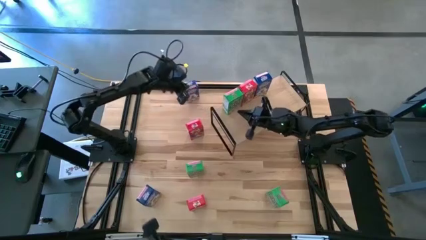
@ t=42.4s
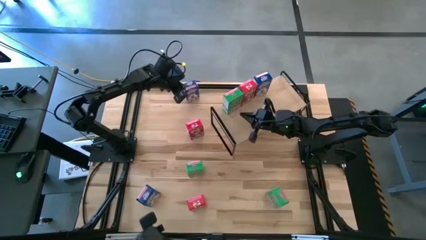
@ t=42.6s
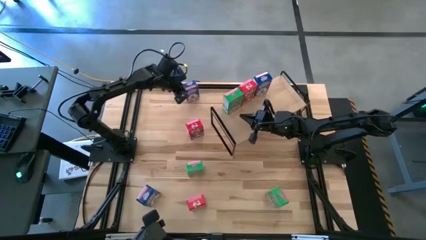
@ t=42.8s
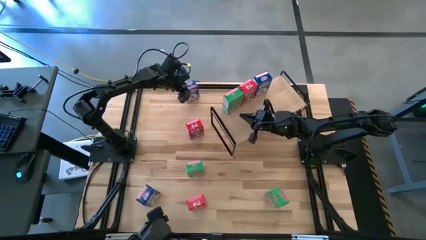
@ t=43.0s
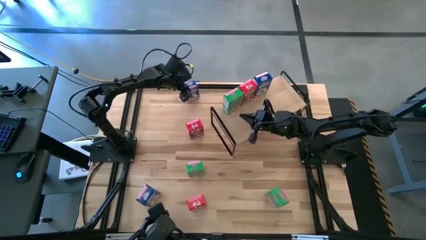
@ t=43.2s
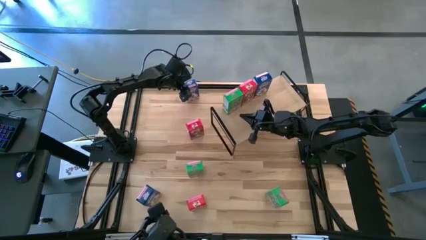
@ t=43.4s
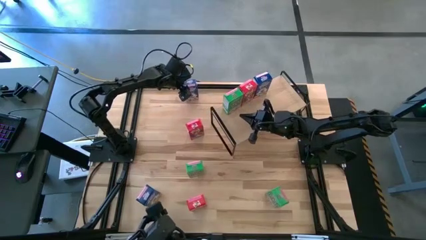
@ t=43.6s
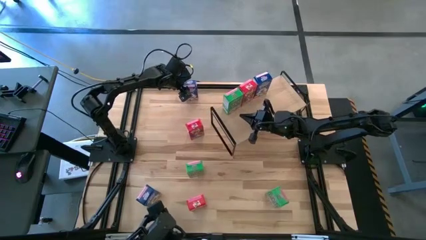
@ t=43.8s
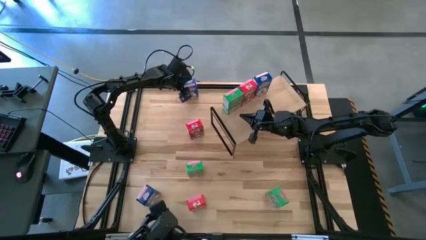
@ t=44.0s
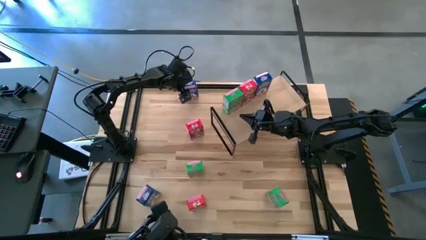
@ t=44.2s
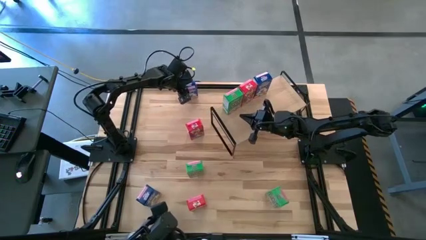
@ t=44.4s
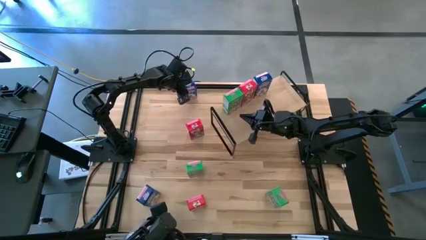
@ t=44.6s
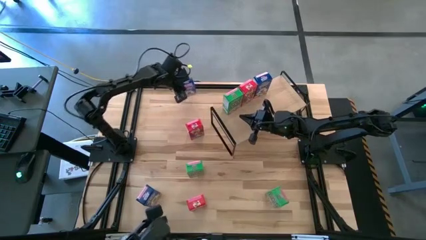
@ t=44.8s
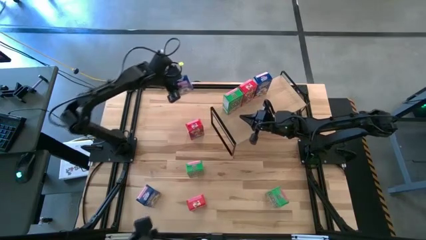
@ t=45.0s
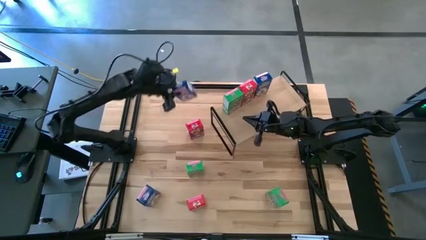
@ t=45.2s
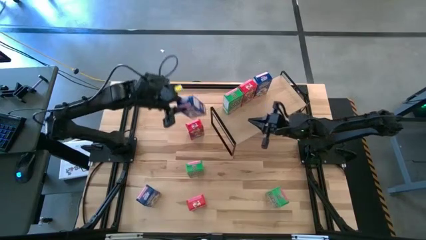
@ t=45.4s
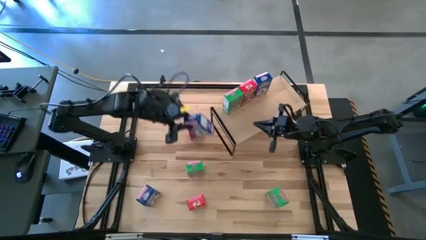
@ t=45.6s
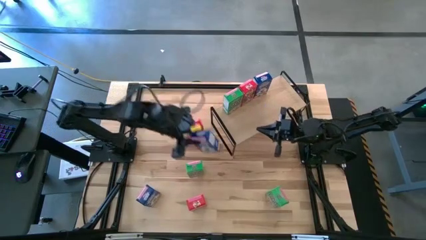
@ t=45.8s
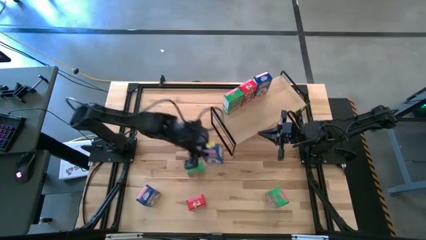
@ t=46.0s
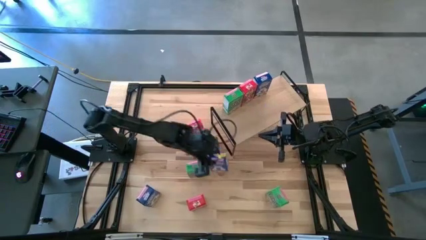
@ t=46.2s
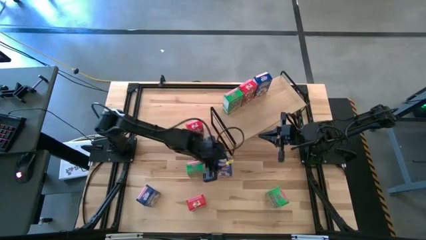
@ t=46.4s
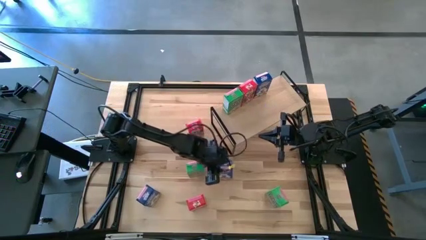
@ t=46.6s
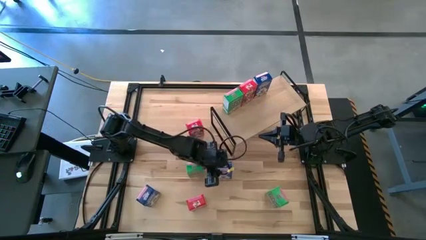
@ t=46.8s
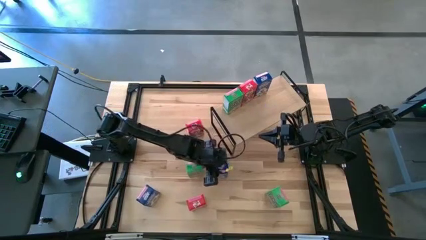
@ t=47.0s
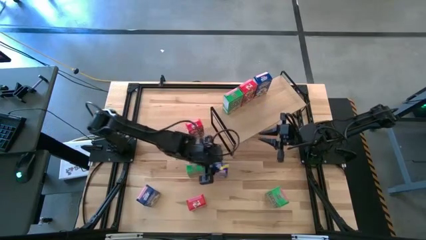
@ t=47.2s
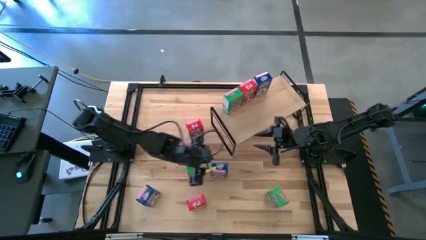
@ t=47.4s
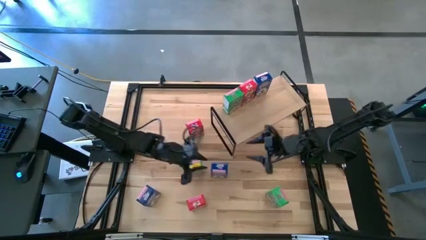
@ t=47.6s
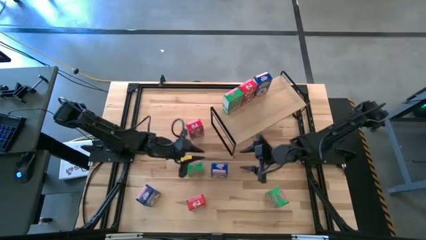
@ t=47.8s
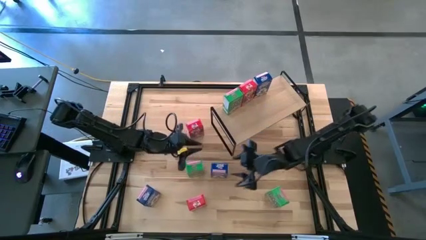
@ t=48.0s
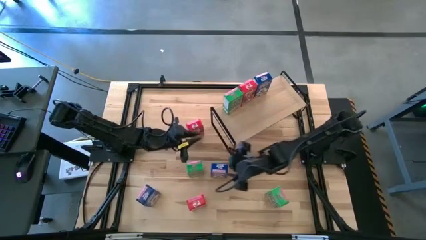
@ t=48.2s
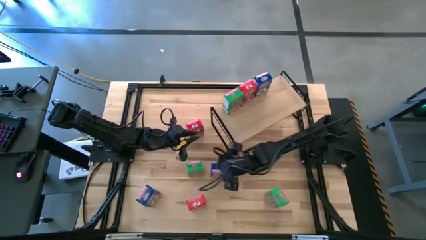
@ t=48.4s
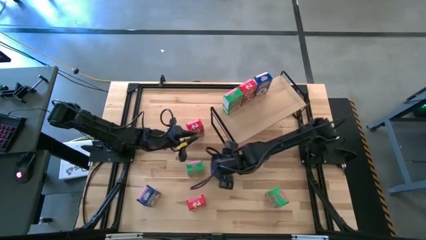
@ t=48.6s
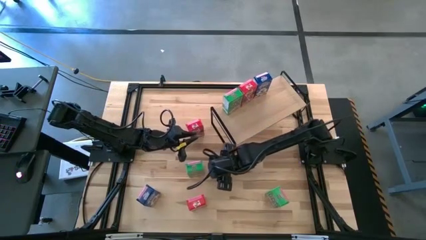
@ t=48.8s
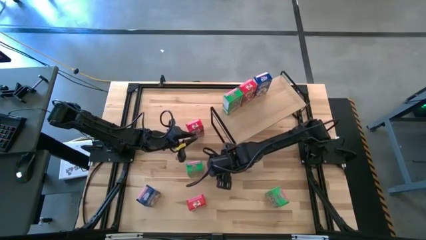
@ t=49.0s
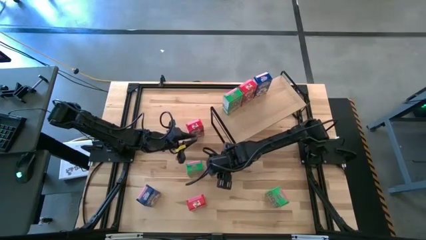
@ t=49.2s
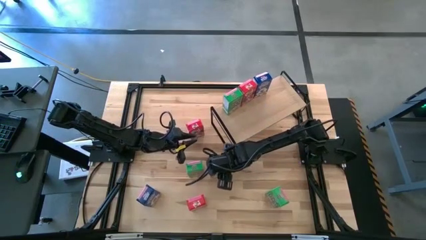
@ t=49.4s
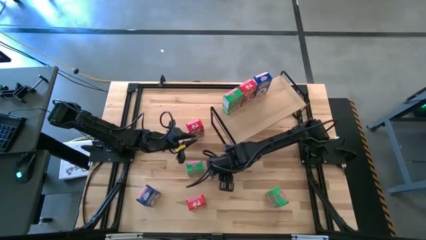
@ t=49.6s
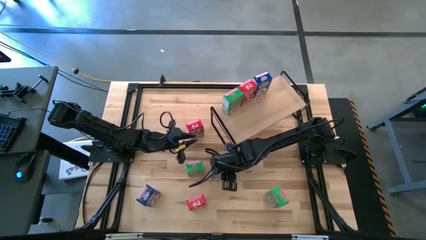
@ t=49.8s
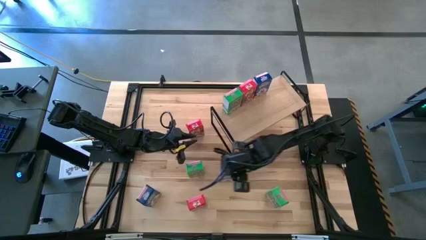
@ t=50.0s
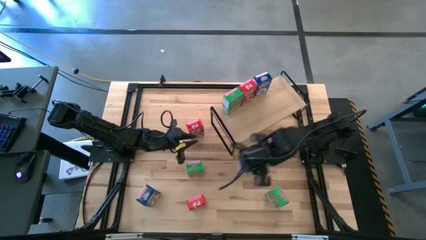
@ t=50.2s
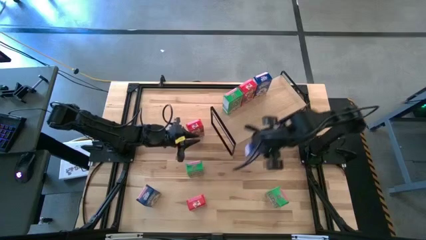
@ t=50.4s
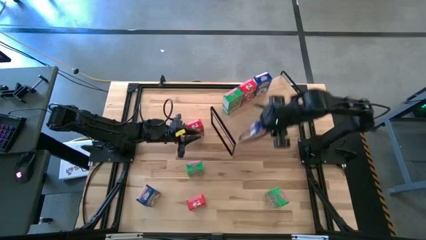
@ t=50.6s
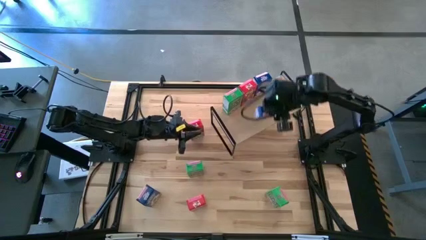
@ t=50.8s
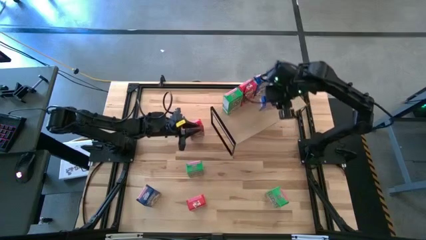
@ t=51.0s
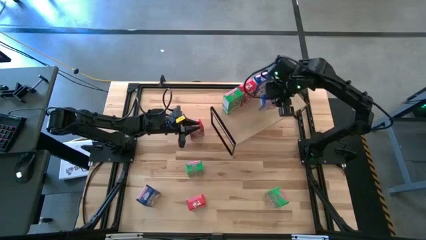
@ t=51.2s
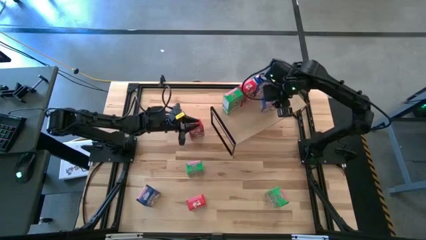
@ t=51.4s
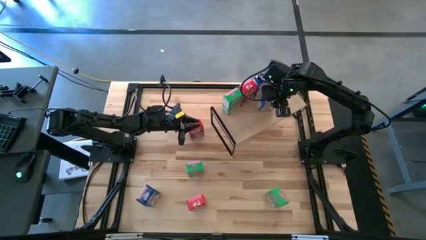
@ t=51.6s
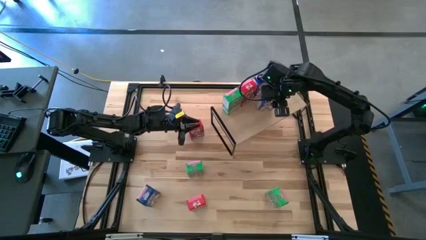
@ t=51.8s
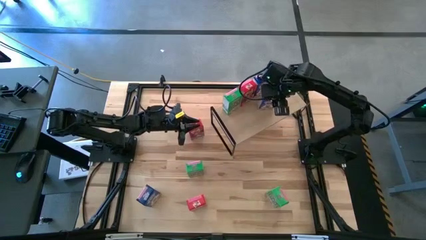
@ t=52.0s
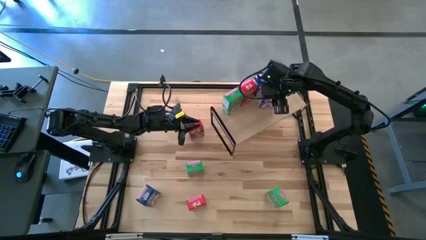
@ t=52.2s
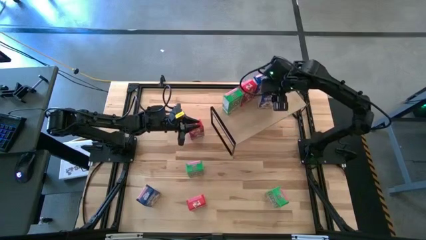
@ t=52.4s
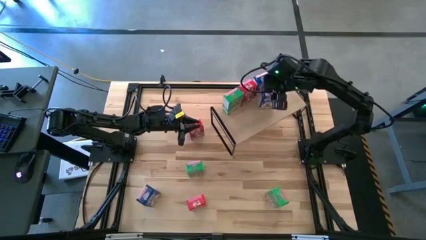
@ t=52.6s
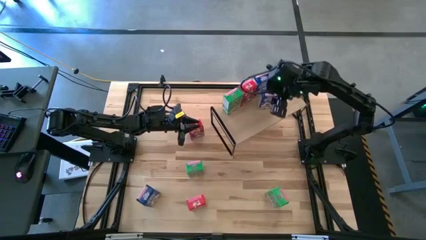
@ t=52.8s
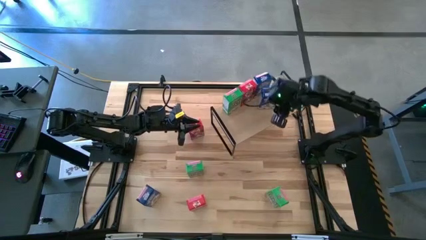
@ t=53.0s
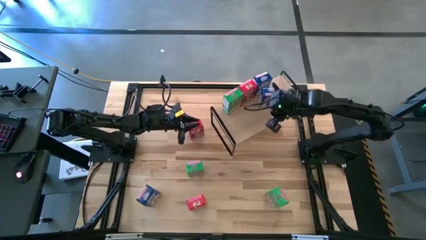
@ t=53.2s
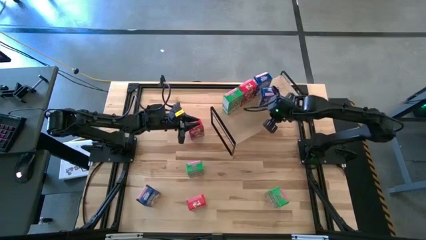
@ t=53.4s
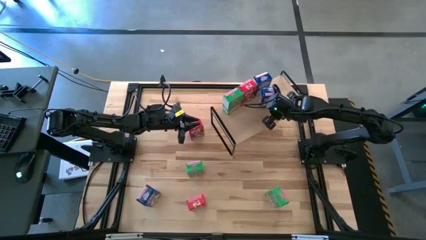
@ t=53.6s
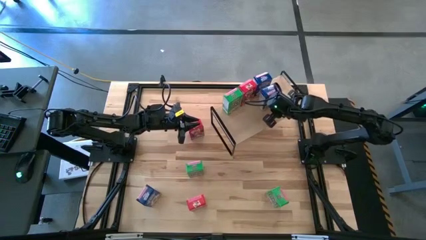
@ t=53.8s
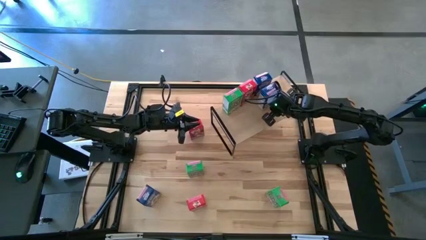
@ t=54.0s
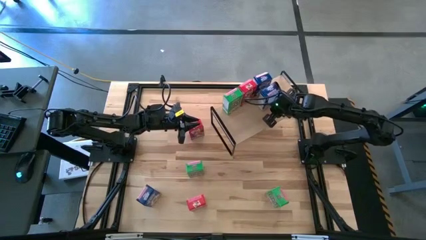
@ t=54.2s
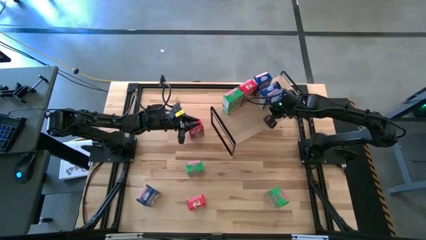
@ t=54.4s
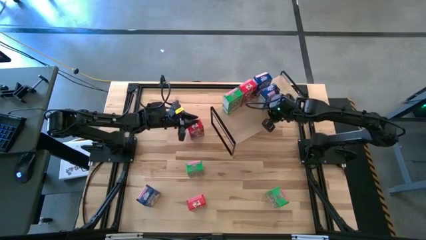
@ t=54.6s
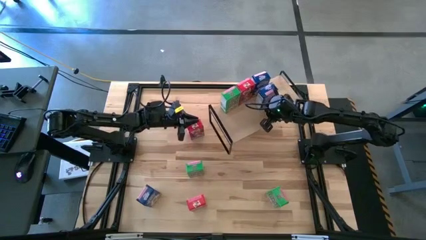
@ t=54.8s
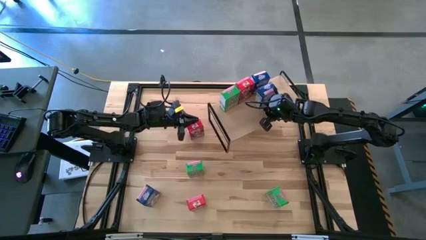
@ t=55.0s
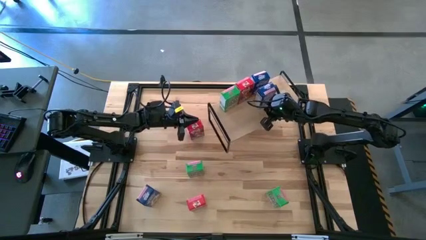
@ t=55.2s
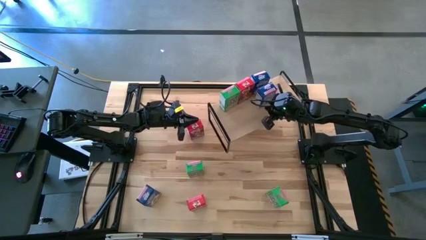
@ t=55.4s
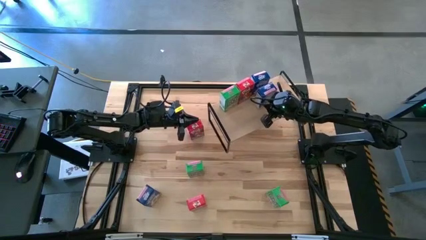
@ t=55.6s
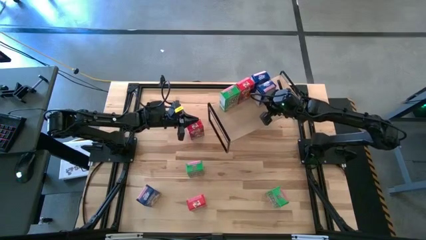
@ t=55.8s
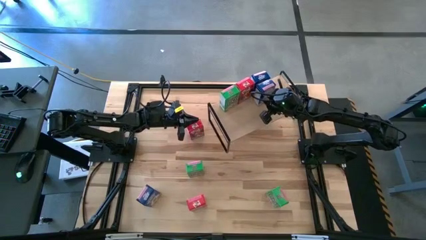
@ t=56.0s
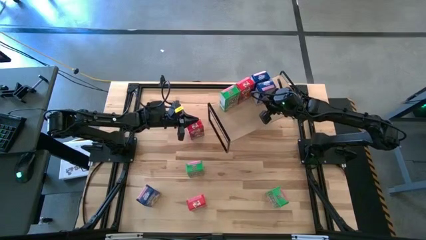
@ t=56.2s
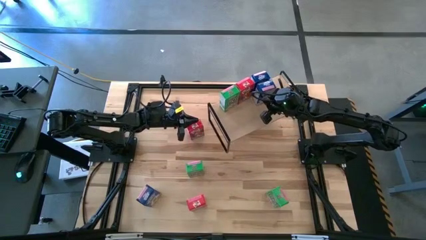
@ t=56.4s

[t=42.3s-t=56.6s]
Task: Stack cereal on shelf
Put the top blue cereal box on the shelf and aligned with the other blue cereal box
